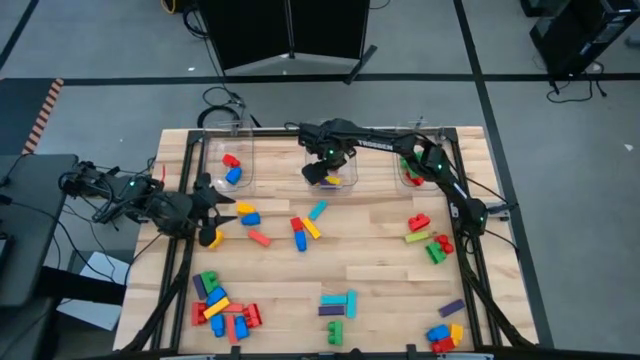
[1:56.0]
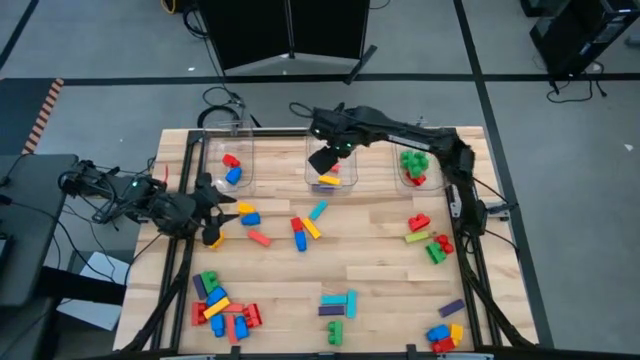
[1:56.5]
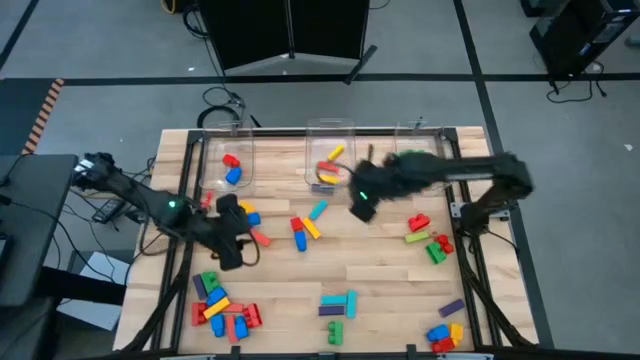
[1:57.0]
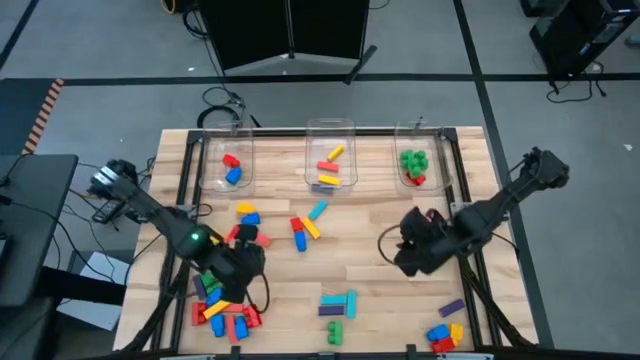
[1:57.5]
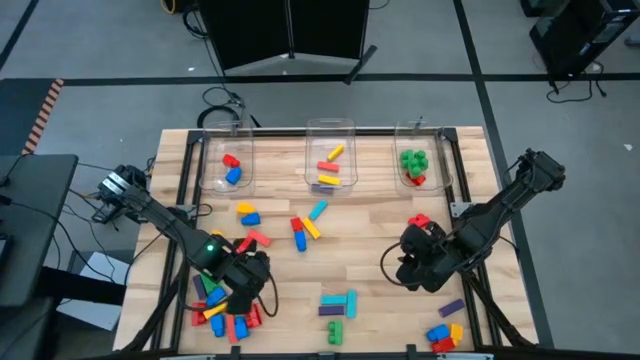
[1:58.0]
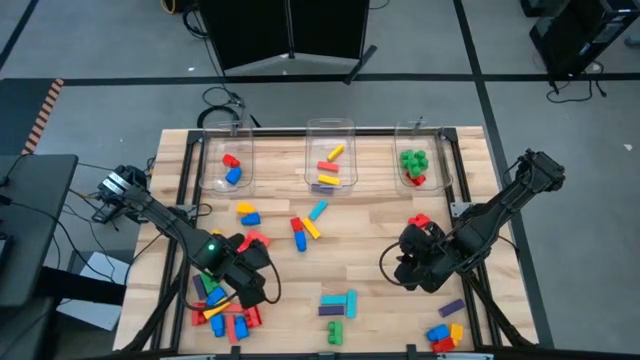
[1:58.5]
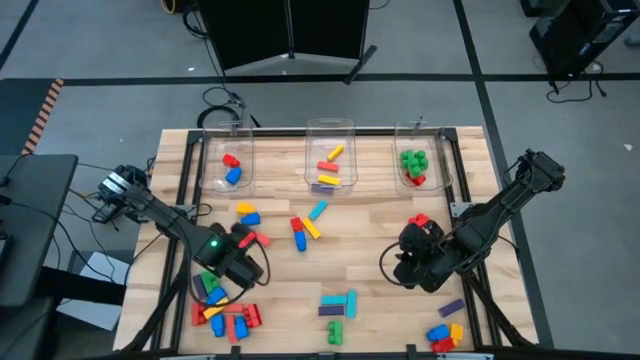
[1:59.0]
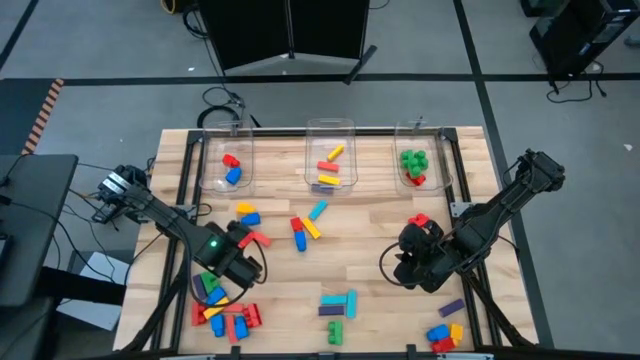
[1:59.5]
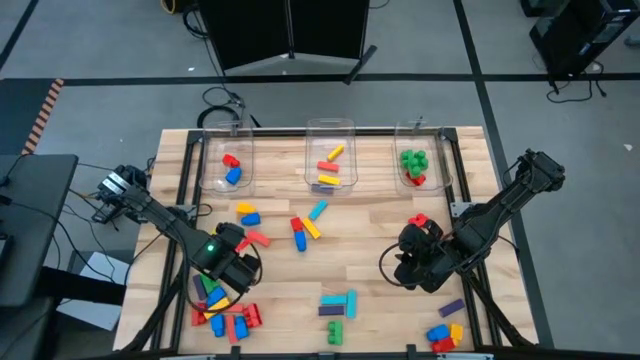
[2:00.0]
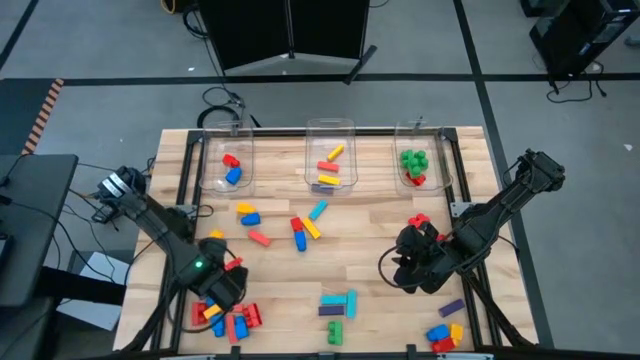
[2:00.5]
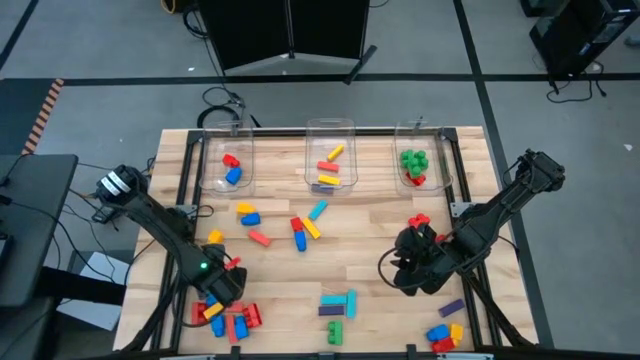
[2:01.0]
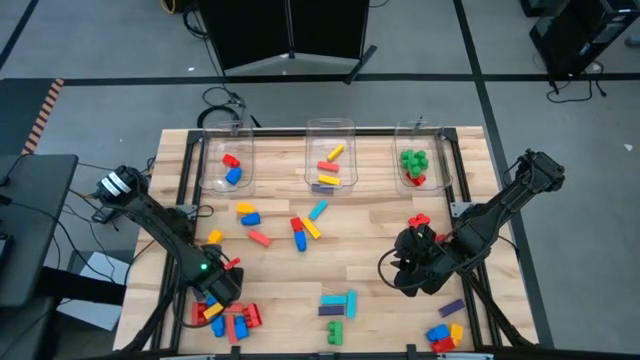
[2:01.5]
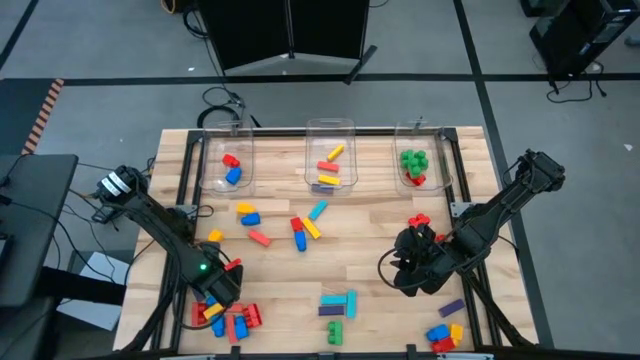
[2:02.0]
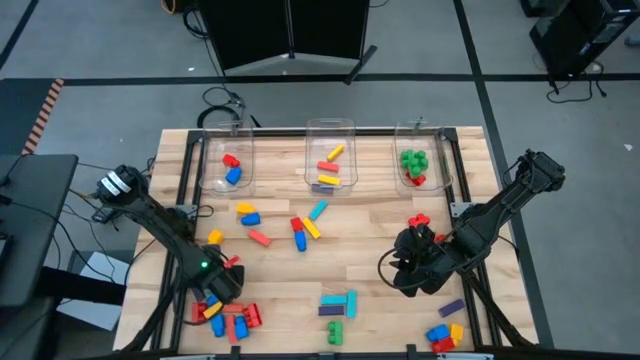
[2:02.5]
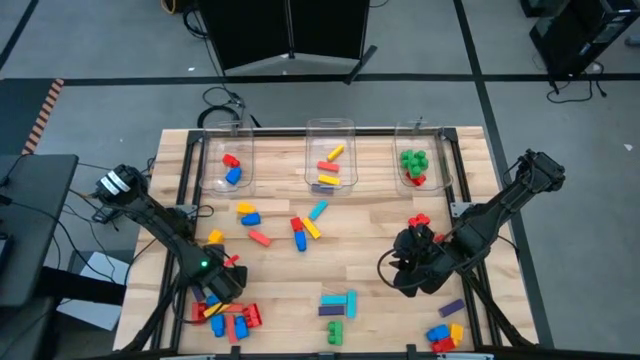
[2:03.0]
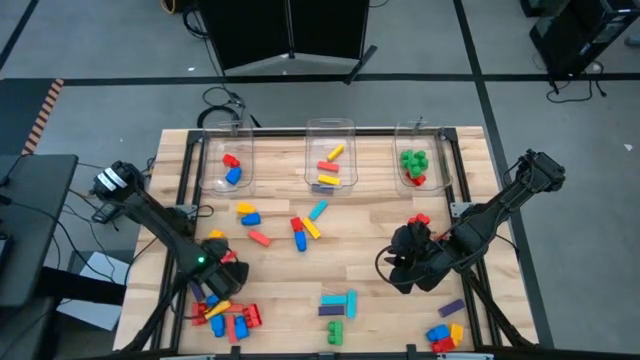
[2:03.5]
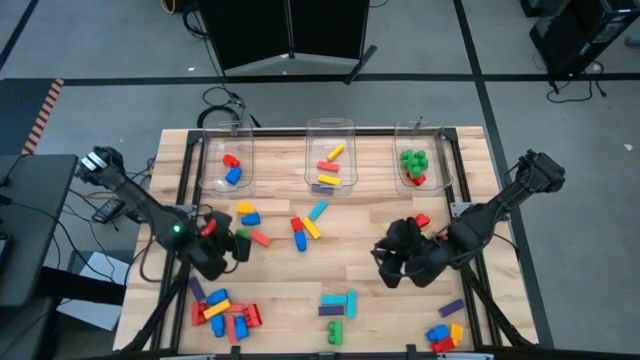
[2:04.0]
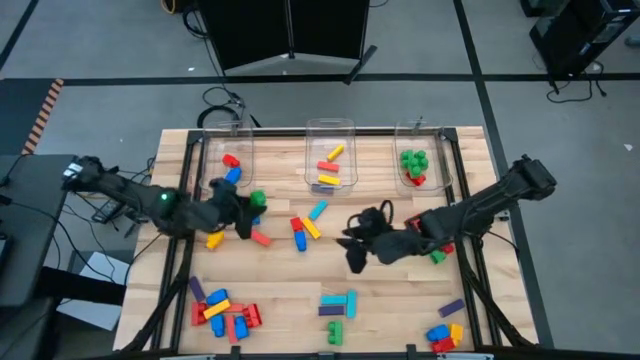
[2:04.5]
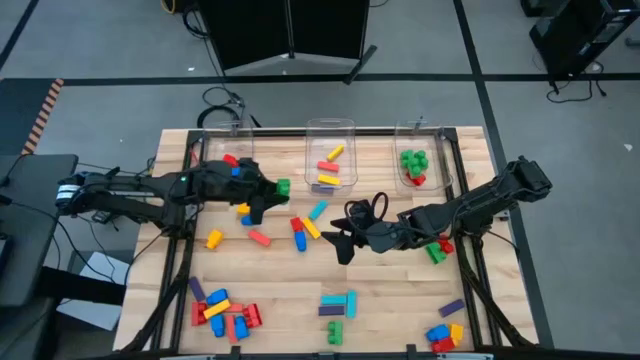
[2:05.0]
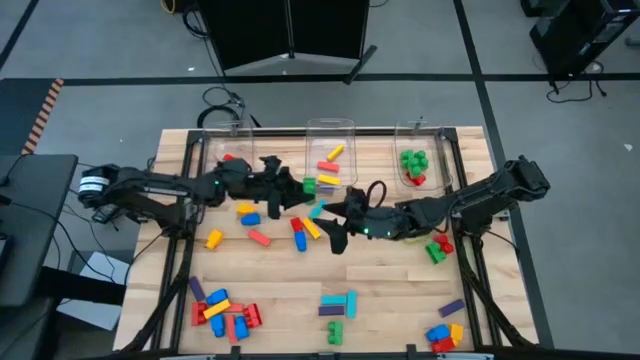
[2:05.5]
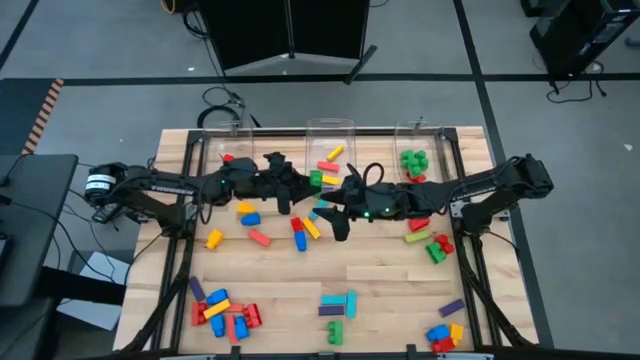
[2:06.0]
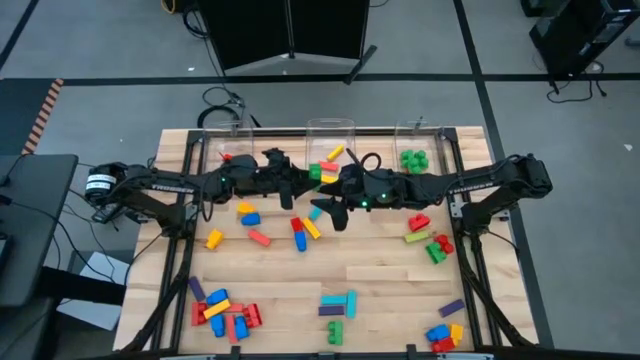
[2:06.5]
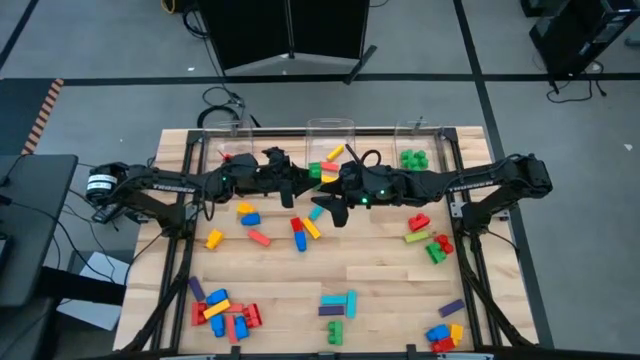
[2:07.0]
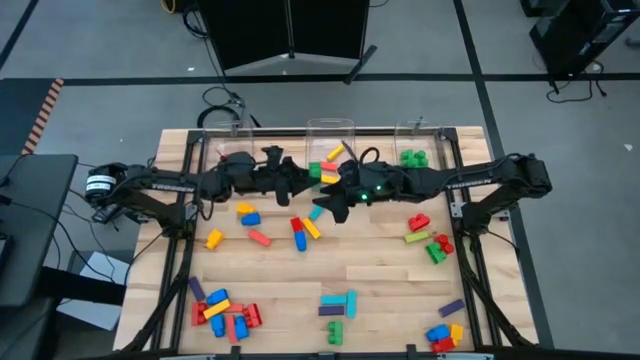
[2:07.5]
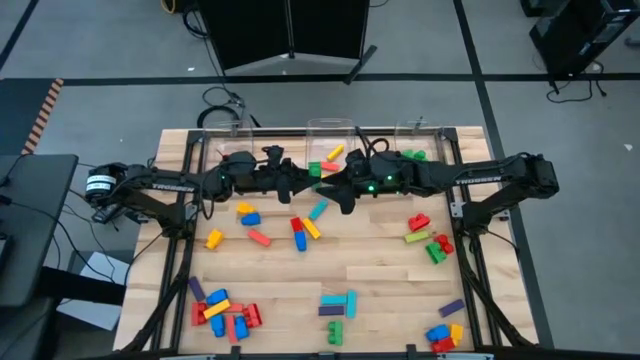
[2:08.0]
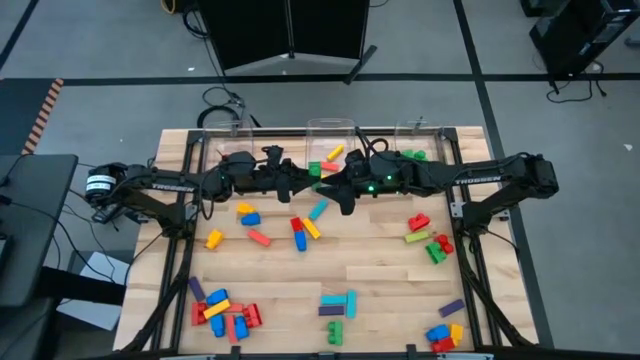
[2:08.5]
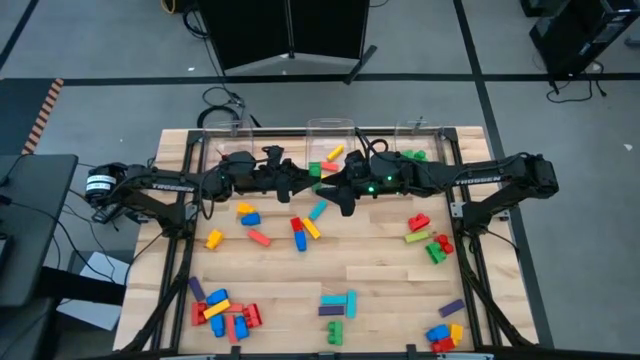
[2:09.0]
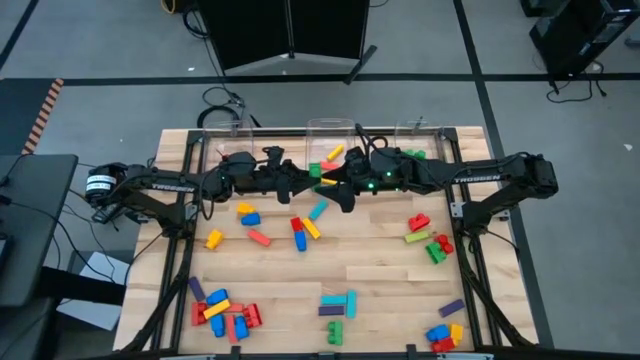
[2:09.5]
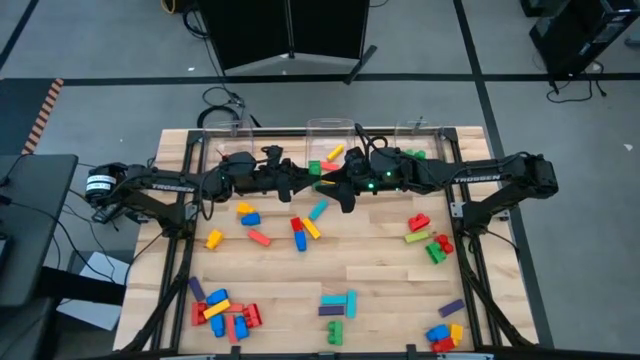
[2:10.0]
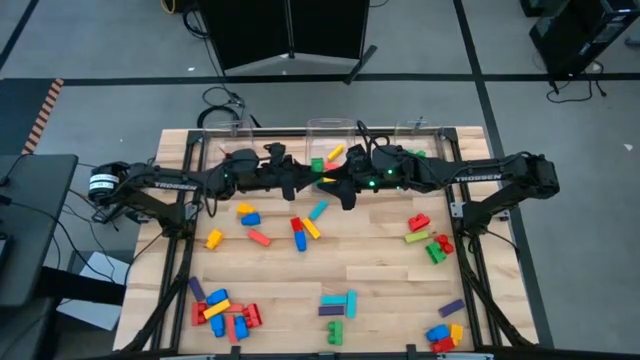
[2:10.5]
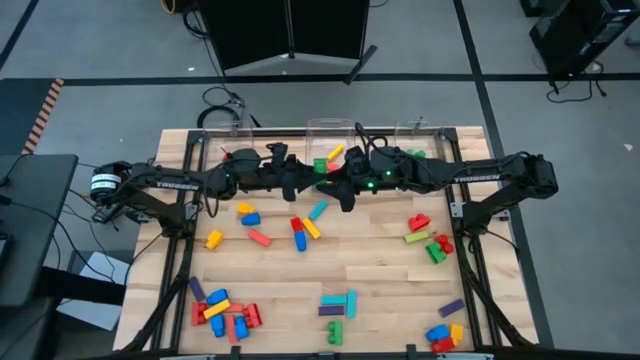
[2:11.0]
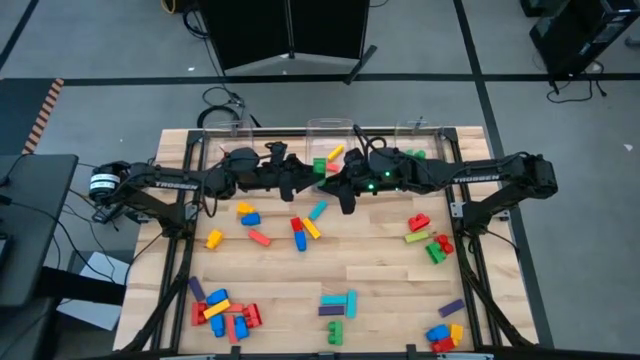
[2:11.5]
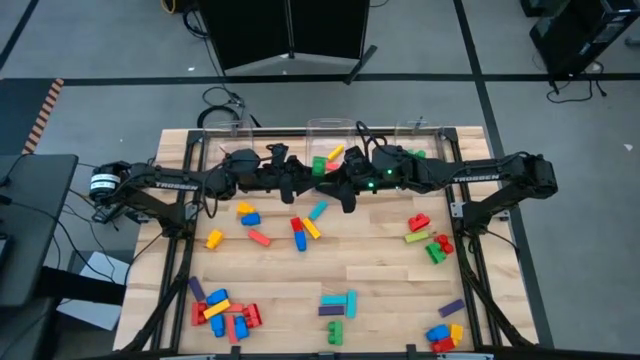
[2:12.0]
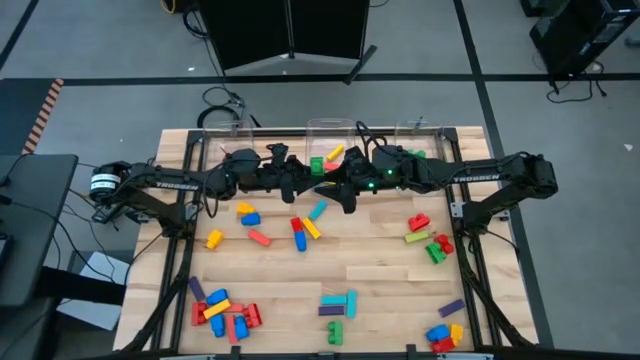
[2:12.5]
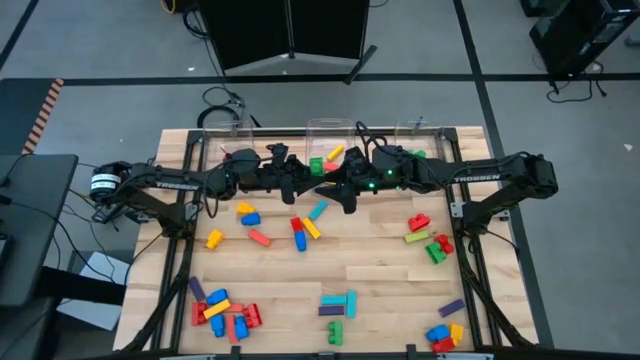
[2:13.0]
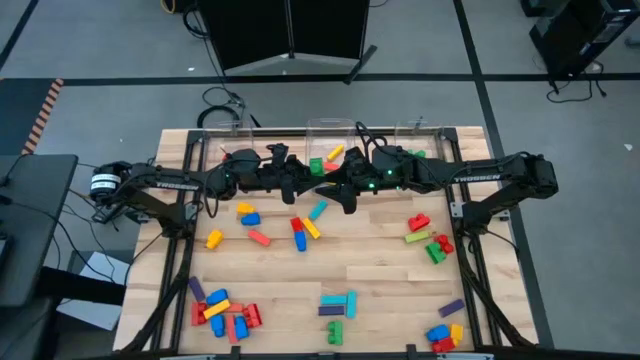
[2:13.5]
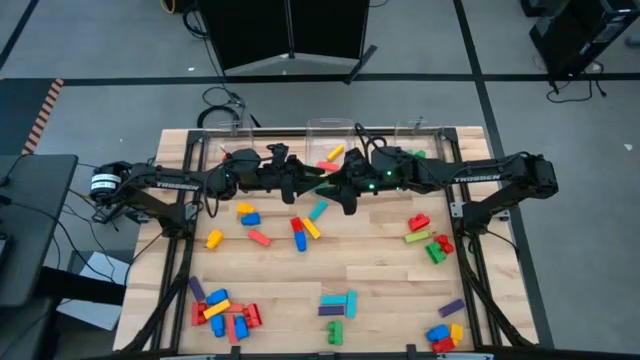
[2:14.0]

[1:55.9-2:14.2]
Task: Sort blocks by size
Put the green 2 stud game piece into the right transparent bin

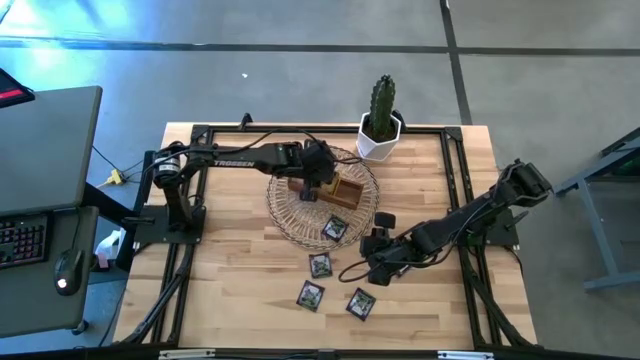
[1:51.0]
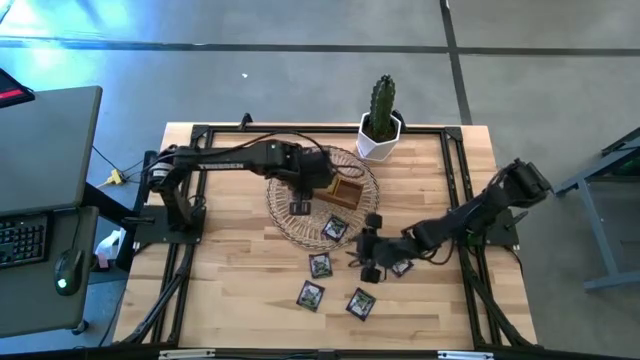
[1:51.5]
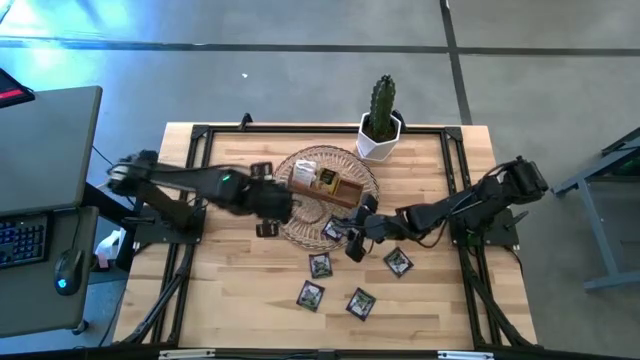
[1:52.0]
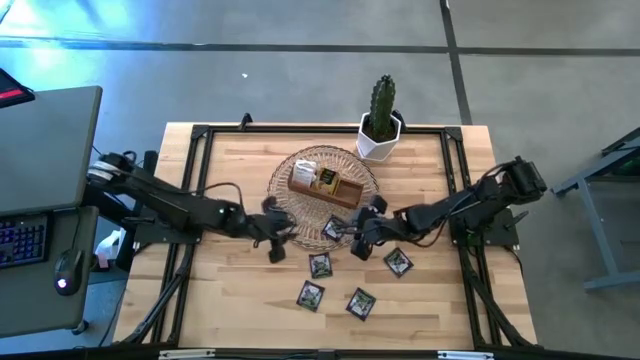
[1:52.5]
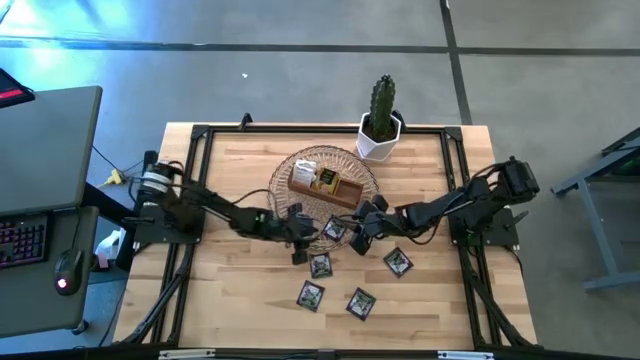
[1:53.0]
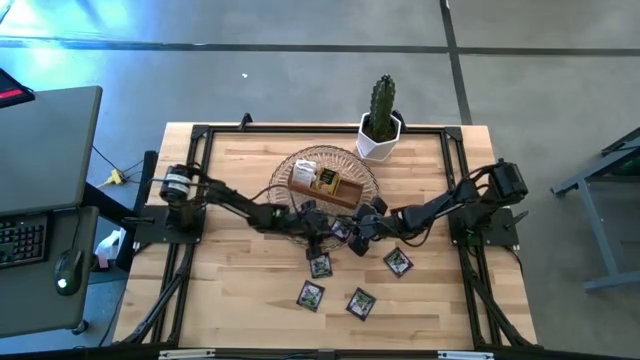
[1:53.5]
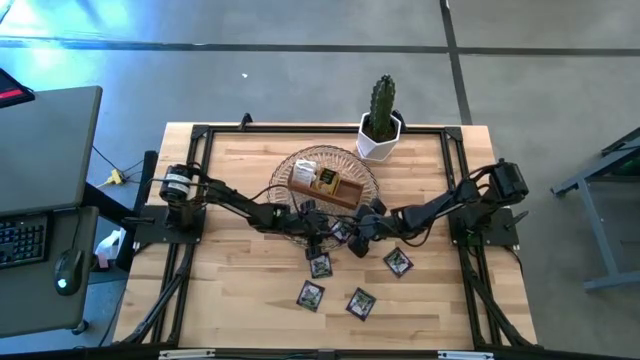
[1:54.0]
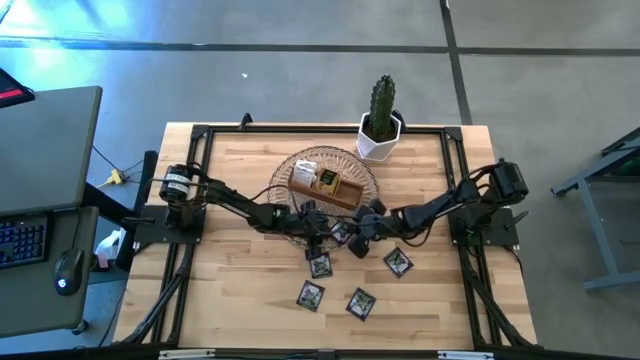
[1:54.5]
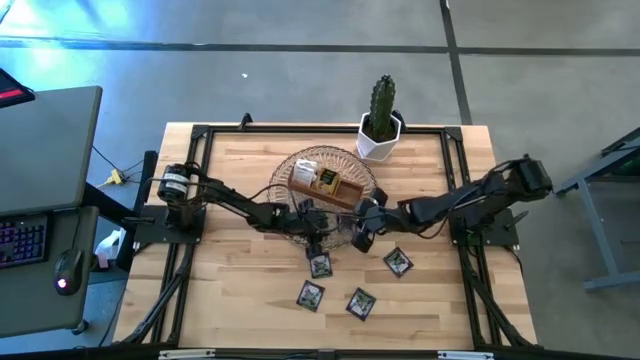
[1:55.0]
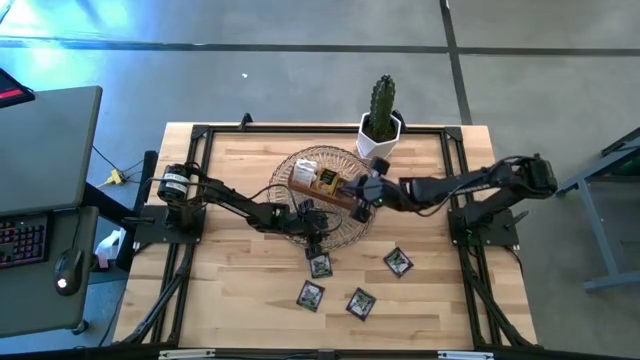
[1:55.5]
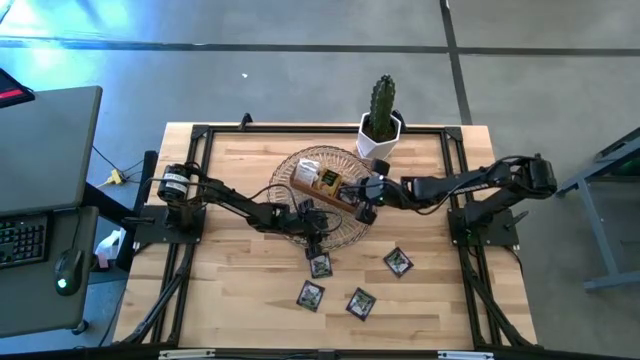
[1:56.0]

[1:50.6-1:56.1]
Task: Pick & Place Tea
Put the purple tea pack into the right section of the wooden organizer
